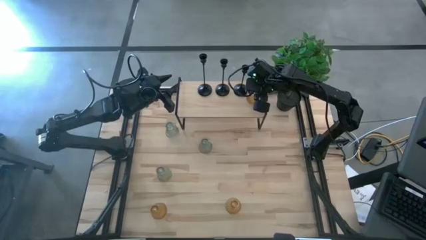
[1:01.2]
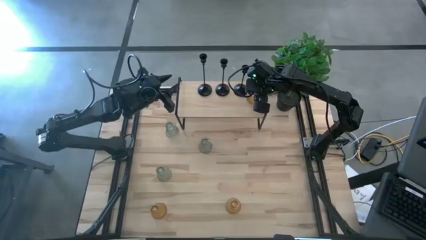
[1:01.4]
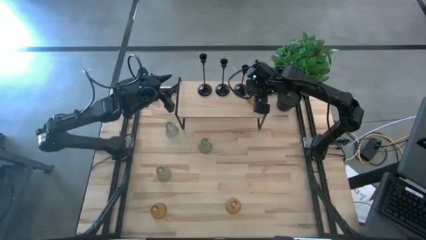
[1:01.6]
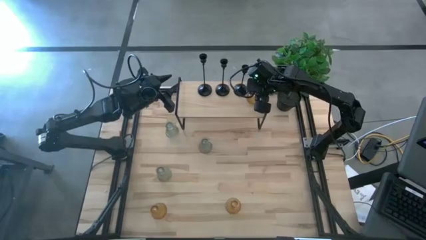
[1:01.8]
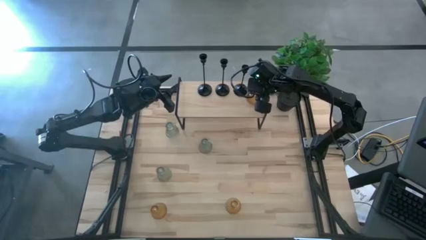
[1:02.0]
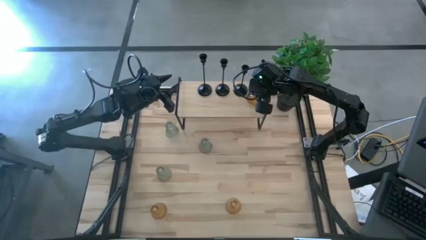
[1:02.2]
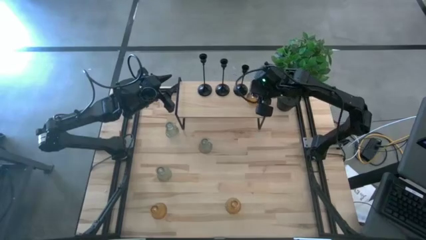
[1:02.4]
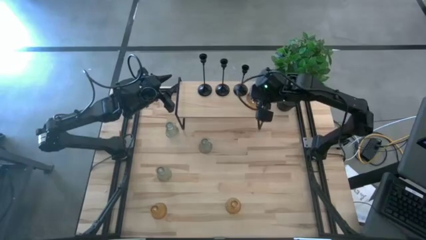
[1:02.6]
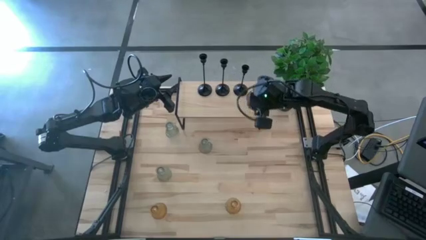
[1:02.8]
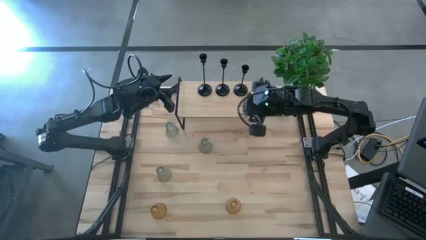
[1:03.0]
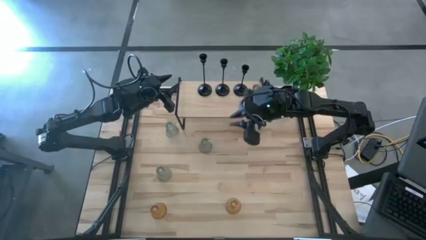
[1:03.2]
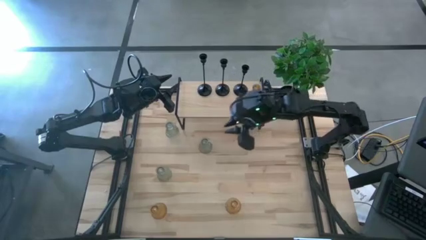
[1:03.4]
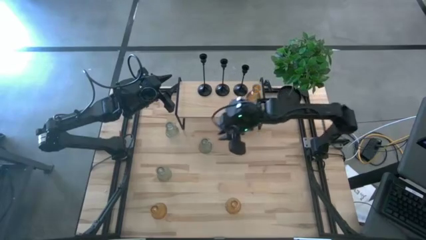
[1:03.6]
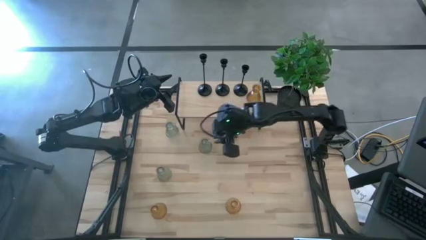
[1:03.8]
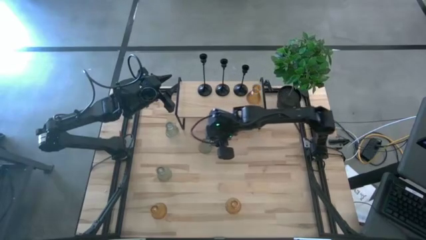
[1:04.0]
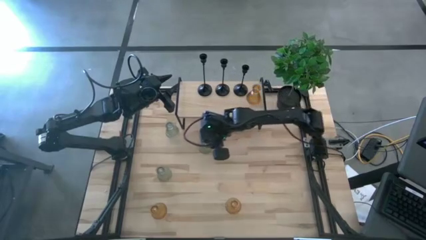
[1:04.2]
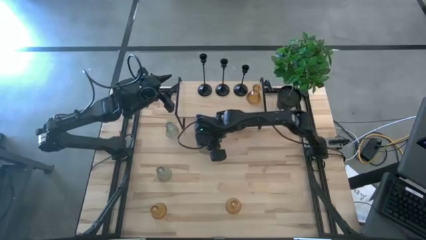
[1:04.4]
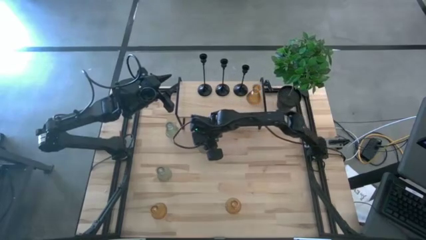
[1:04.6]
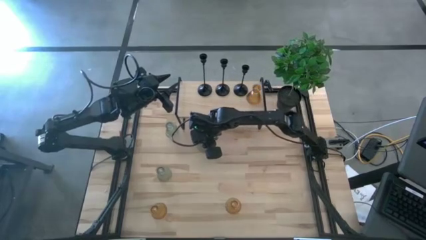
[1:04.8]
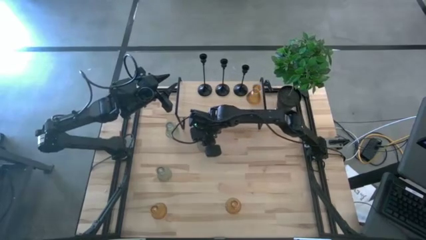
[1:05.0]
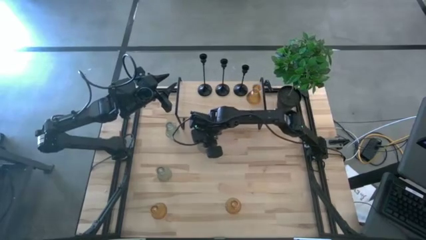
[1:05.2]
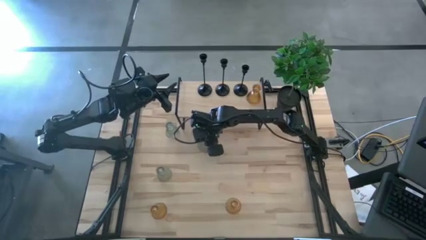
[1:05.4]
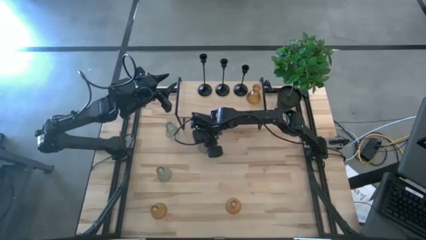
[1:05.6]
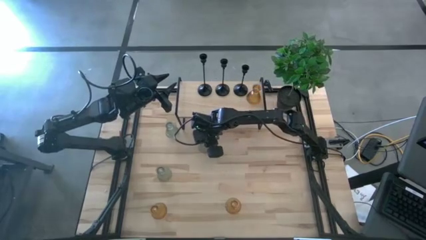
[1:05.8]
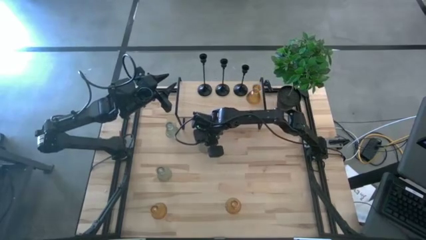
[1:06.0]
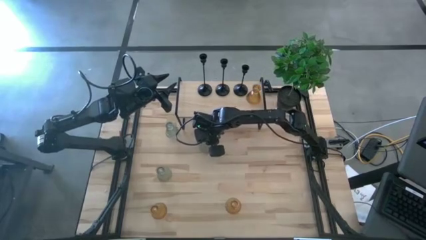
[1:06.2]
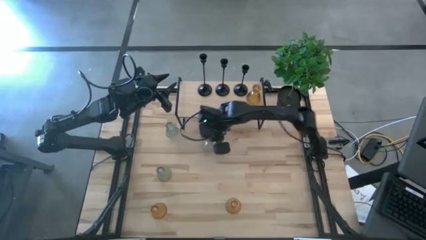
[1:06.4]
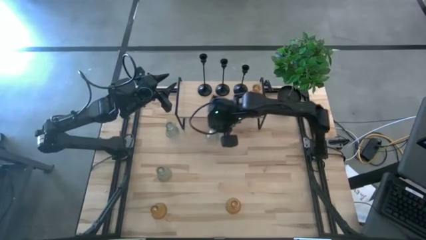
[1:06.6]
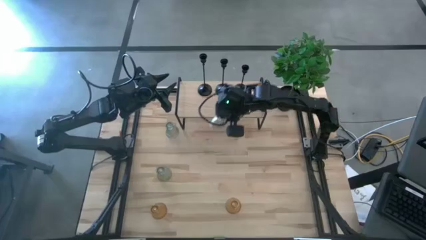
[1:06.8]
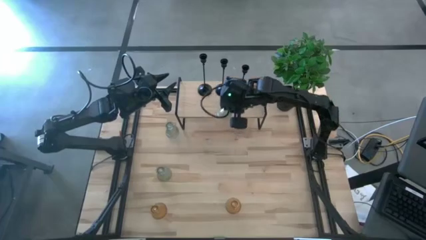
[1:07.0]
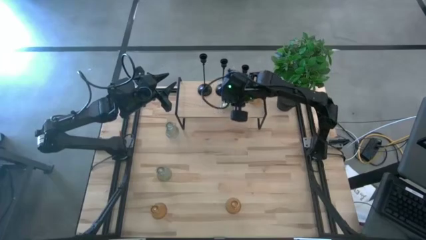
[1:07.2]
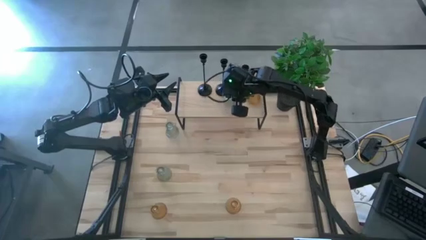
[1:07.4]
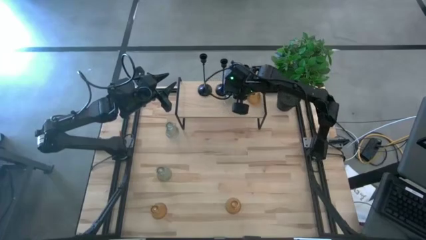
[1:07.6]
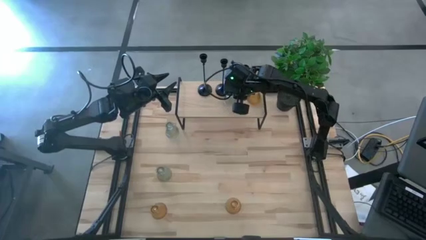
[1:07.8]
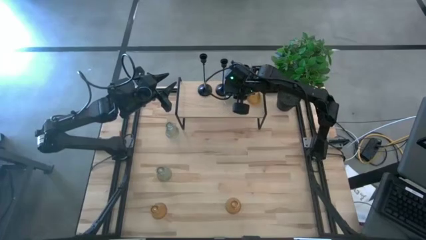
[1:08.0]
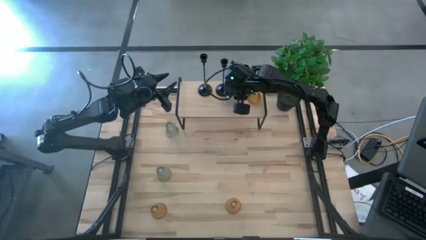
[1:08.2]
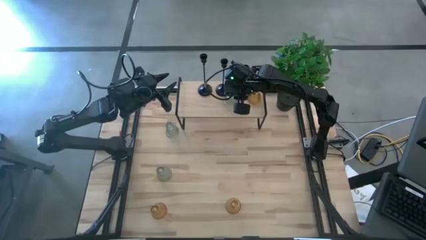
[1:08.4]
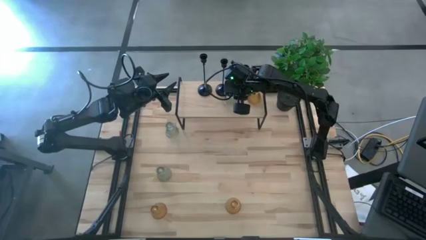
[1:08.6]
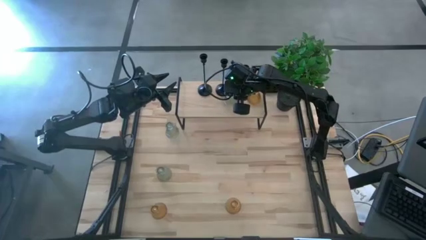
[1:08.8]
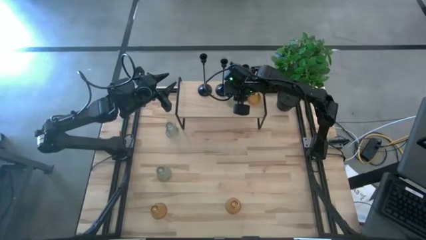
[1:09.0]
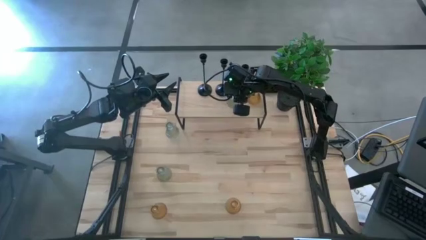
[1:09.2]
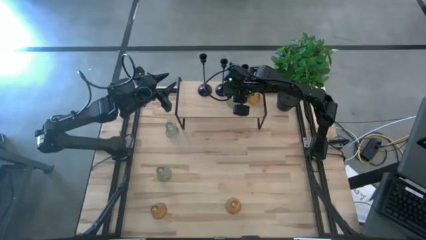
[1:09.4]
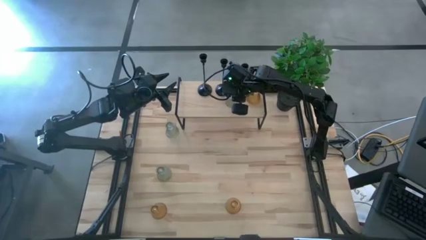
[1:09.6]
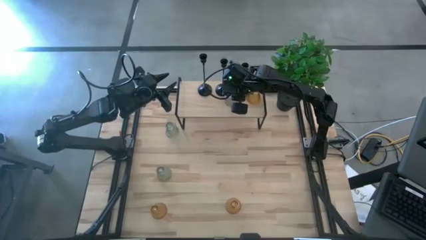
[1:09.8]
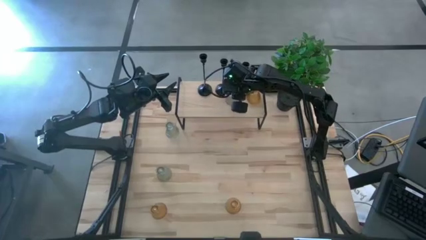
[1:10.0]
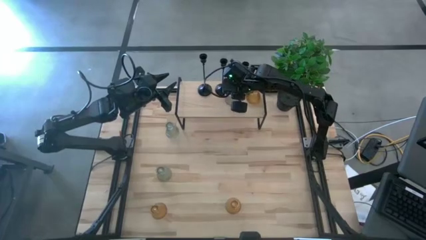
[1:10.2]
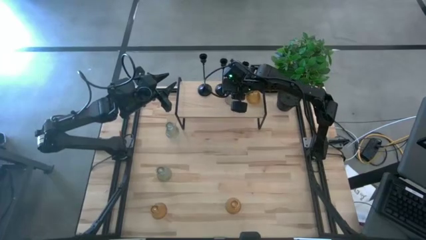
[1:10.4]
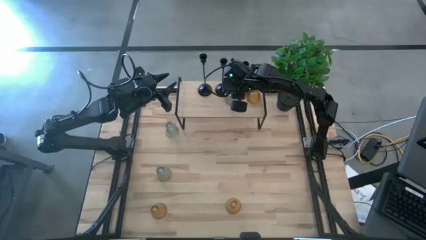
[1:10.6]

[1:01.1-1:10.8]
Task: Pick & Place candle stick holders
Put the middle right green candle holder on the shelf

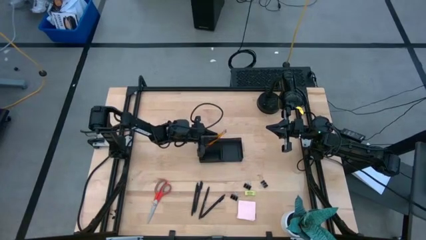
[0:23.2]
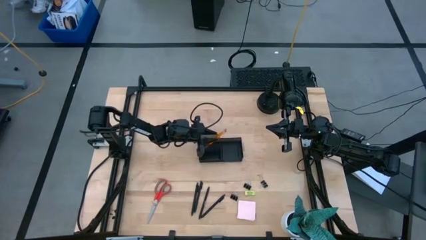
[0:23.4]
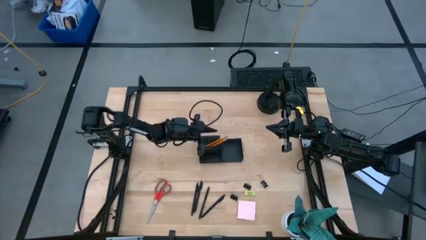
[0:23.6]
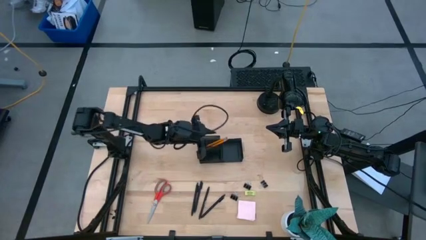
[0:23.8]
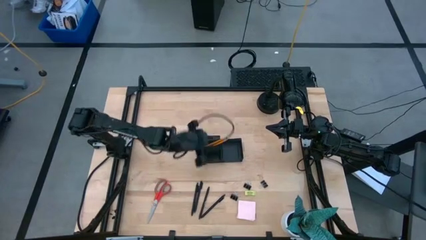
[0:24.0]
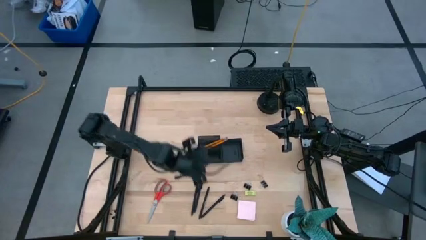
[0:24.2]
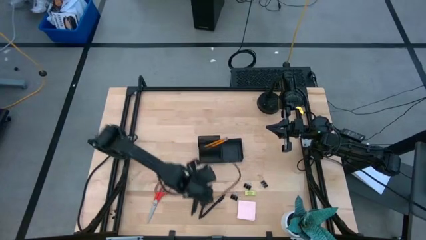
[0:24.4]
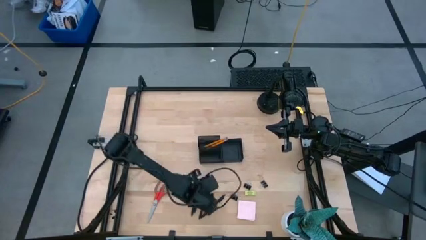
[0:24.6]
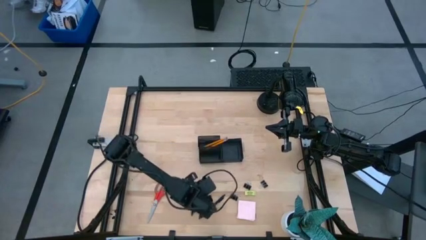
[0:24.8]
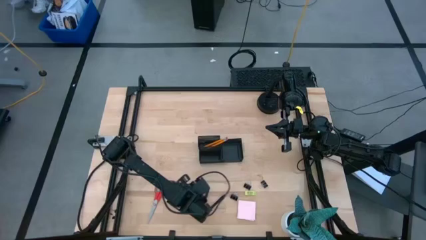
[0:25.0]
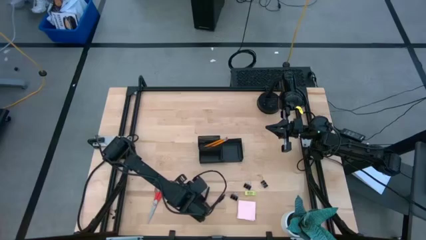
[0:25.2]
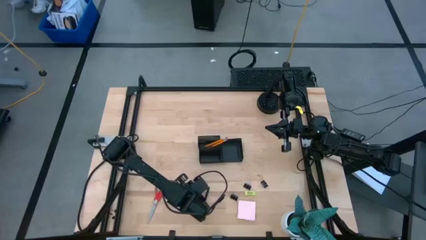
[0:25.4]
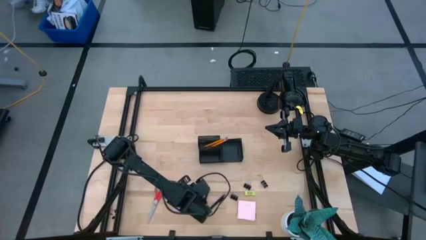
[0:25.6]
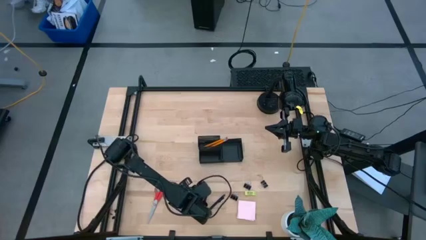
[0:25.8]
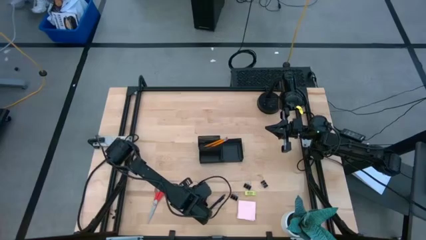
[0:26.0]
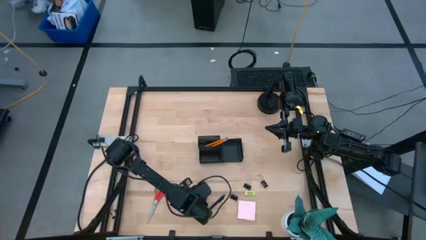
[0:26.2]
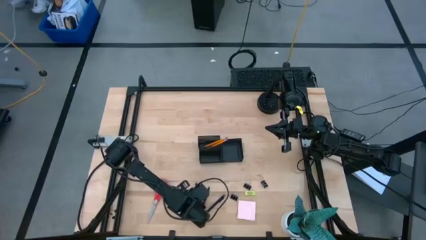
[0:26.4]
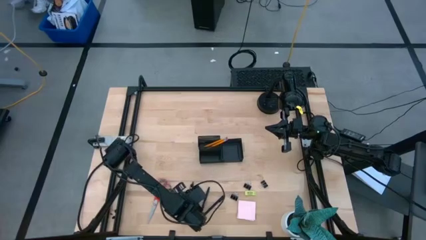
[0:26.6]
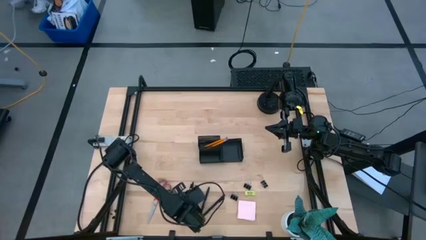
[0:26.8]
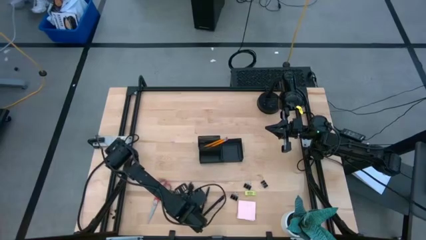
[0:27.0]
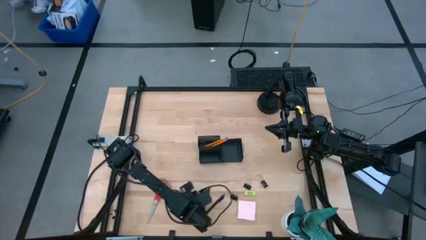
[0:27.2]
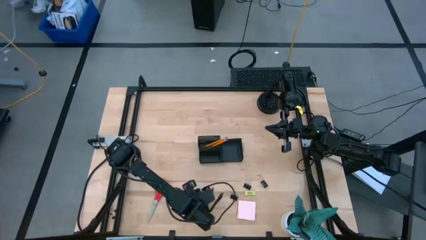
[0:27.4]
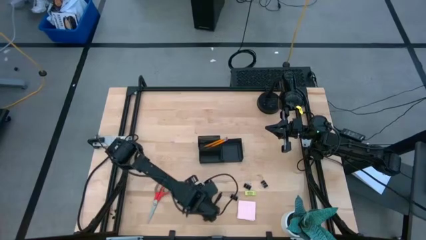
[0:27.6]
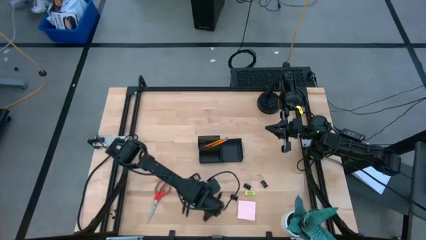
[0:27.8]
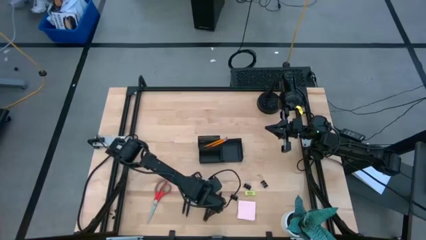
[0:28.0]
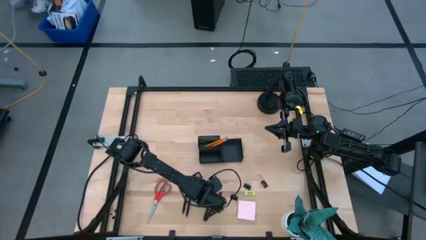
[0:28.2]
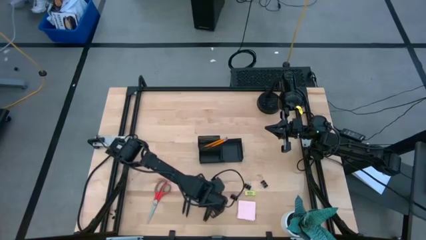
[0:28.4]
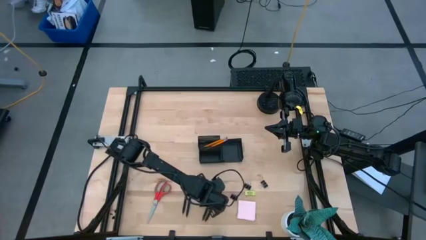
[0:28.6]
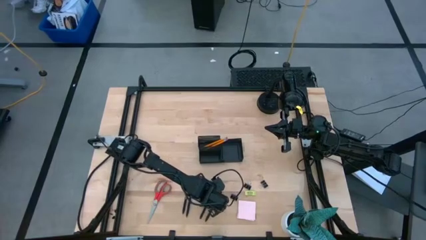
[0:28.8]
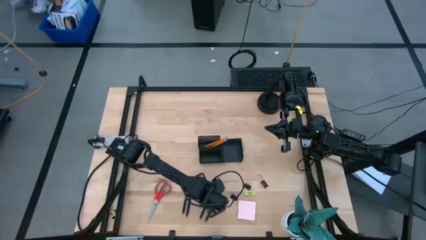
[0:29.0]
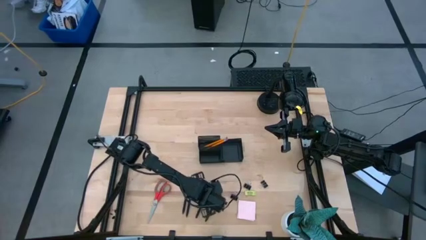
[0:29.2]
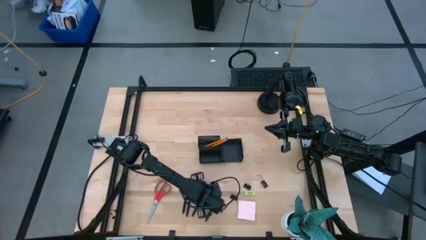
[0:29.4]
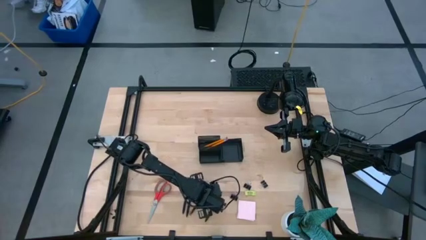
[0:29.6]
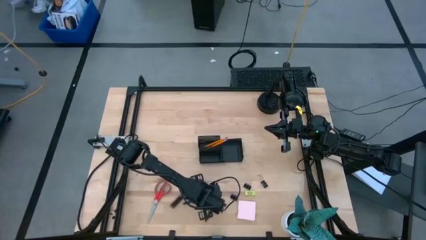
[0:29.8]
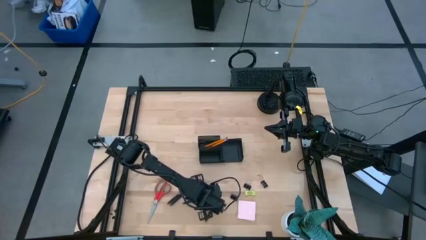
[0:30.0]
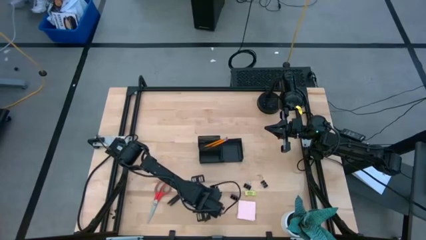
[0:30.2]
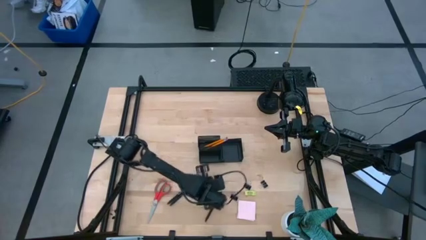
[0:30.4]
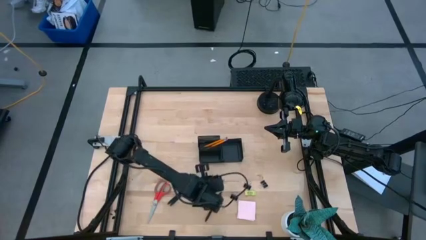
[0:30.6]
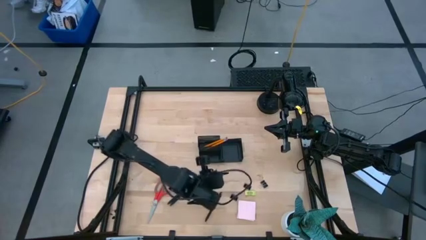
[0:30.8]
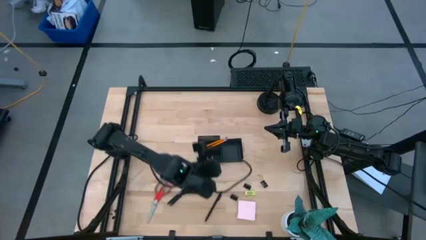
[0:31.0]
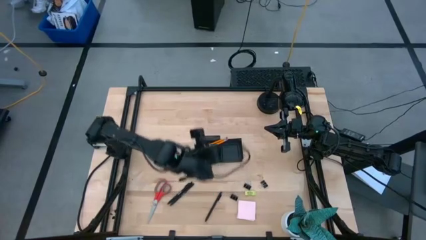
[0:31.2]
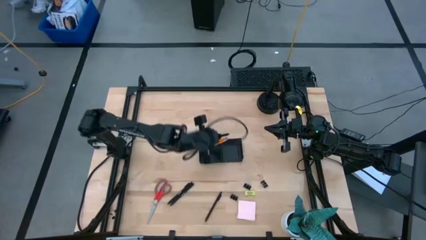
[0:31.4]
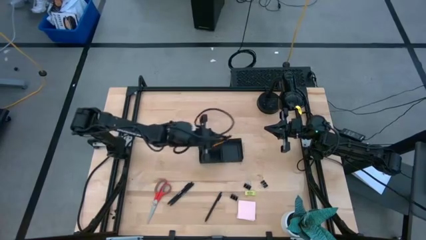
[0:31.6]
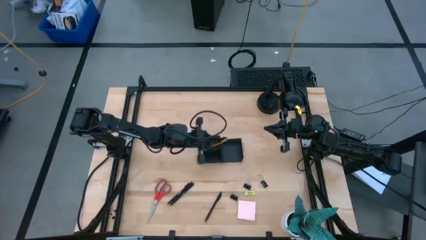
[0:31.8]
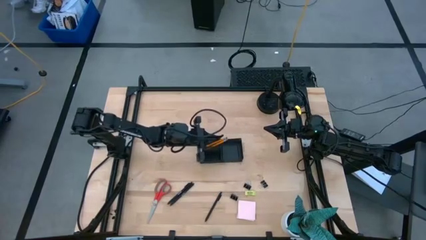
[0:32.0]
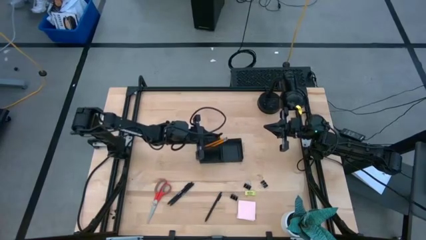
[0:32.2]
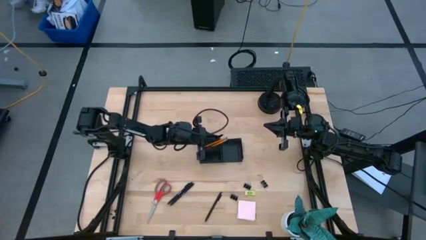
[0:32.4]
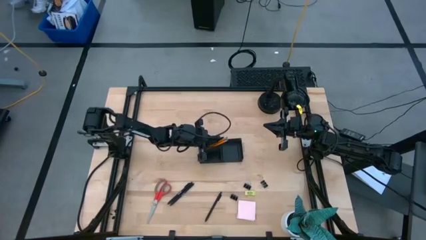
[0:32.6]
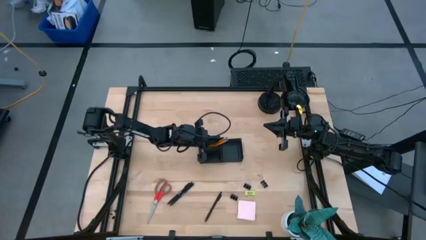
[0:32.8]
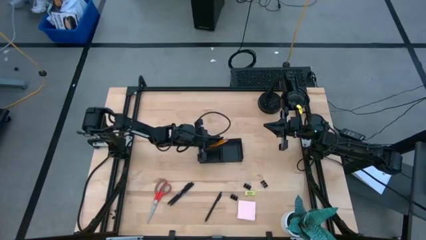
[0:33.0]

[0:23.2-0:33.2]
Task: Pick and place office supplies into organizer
Put the pen into the top left section of the desk organizer
